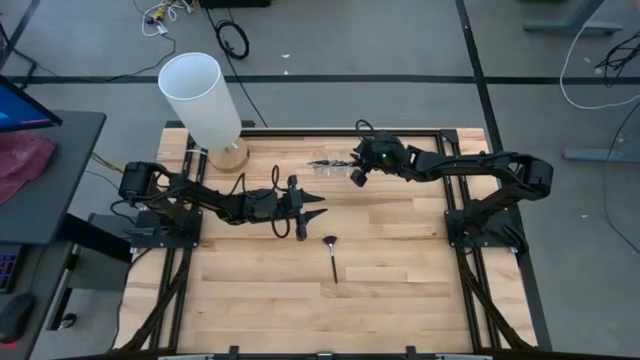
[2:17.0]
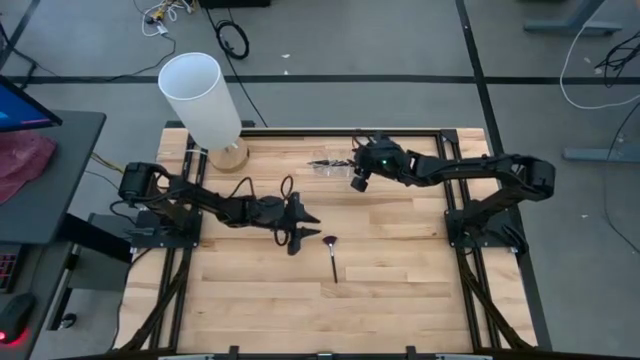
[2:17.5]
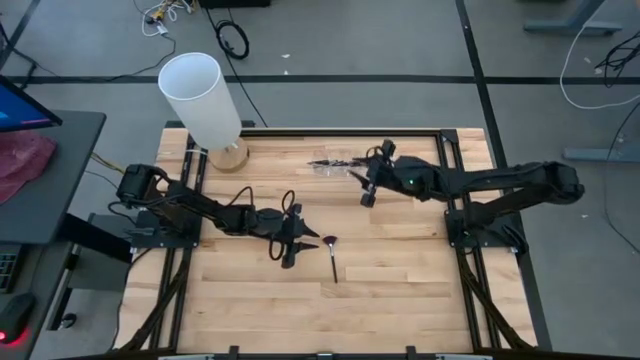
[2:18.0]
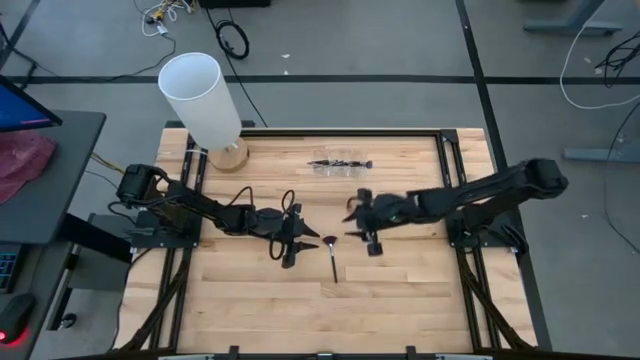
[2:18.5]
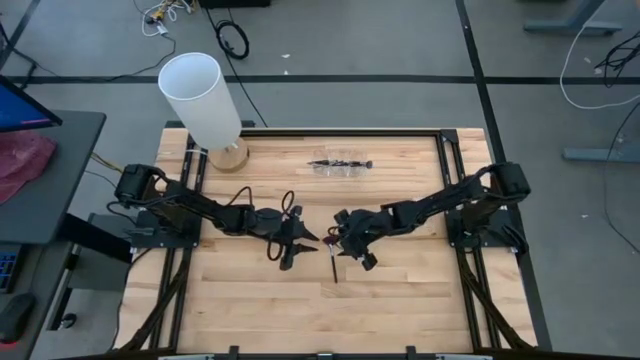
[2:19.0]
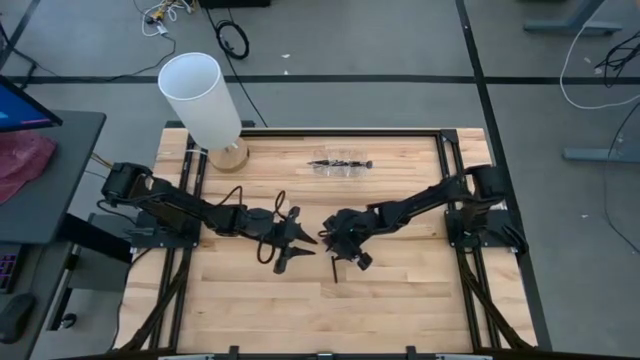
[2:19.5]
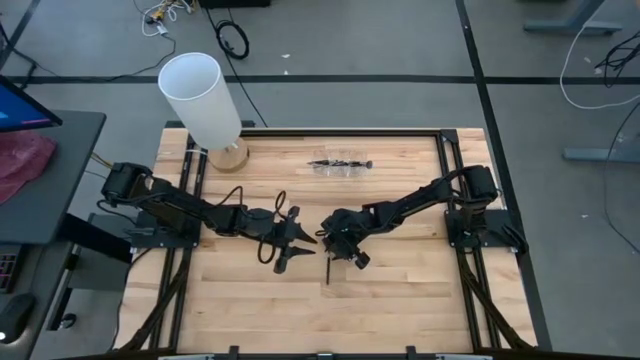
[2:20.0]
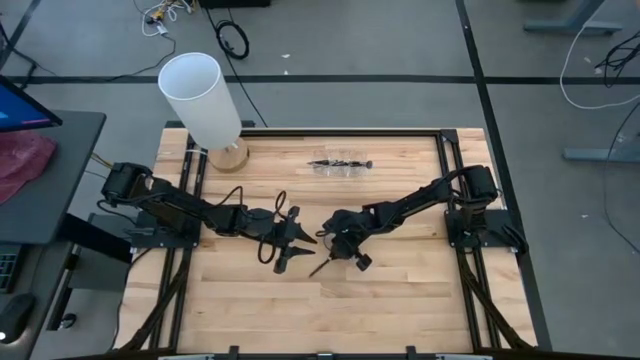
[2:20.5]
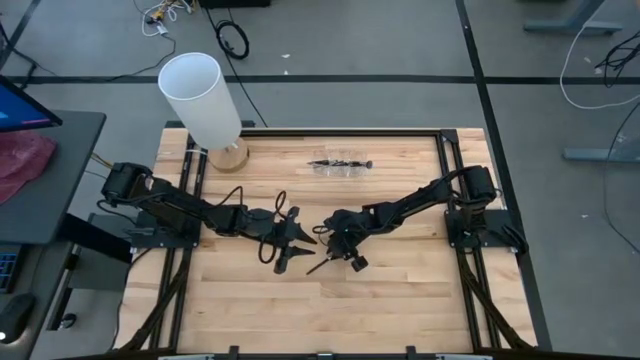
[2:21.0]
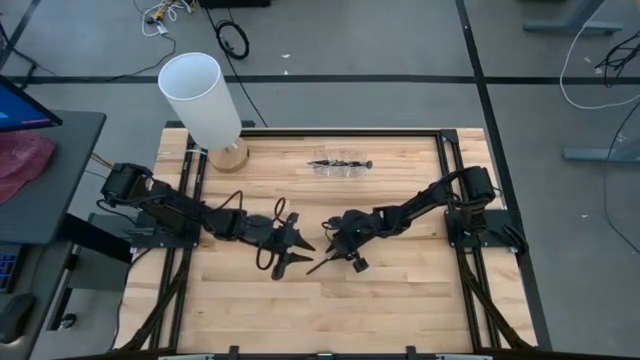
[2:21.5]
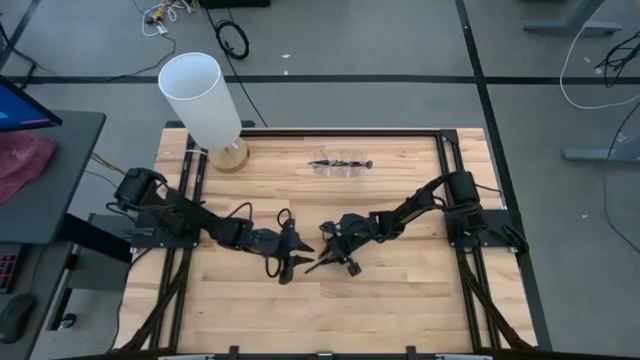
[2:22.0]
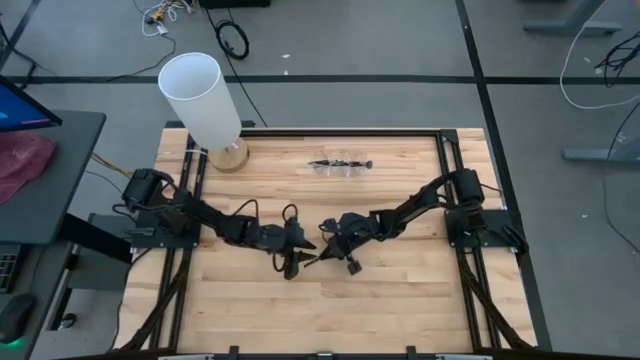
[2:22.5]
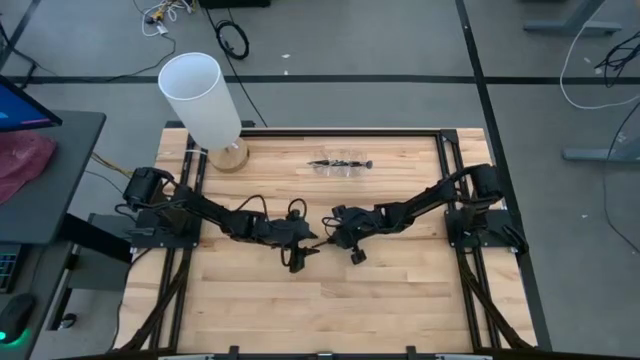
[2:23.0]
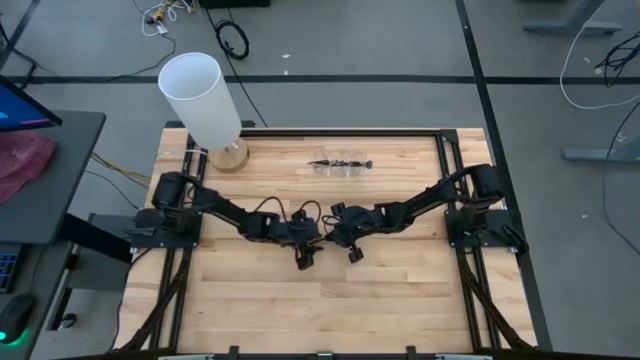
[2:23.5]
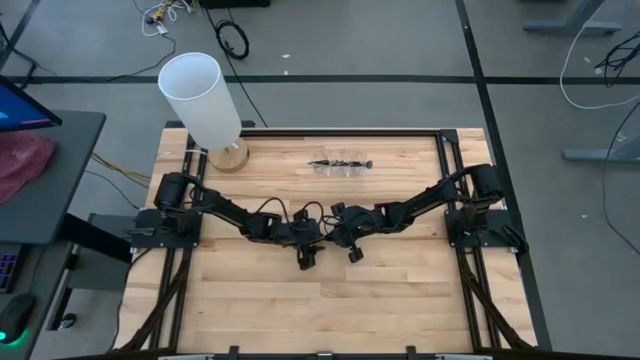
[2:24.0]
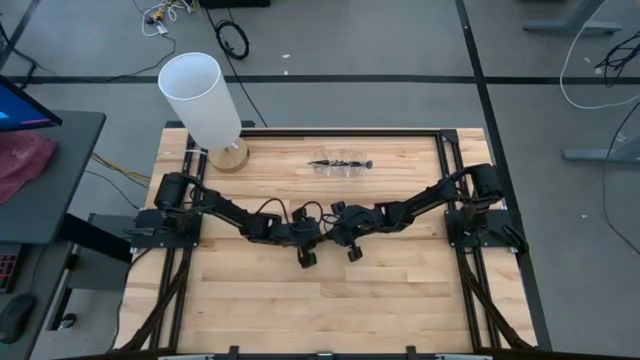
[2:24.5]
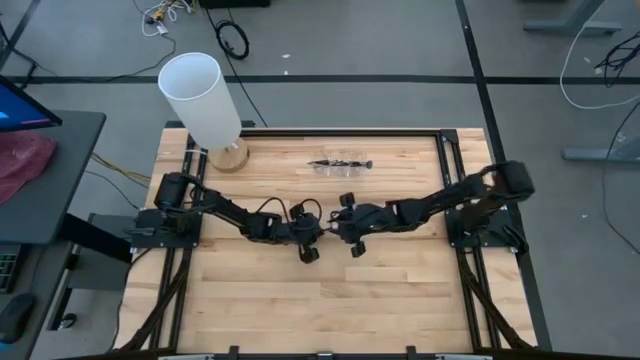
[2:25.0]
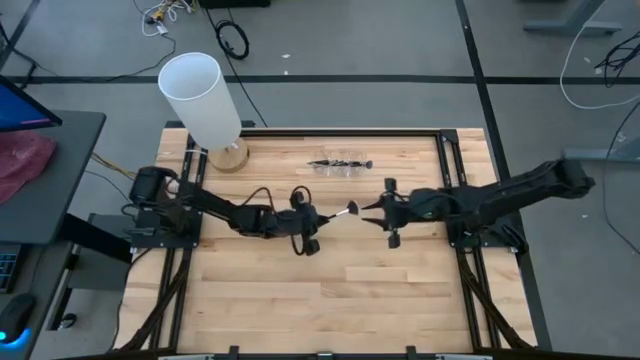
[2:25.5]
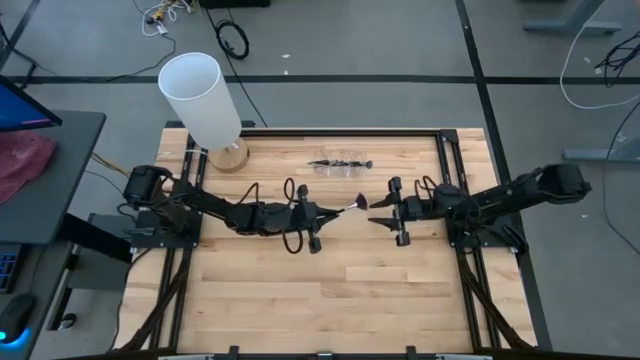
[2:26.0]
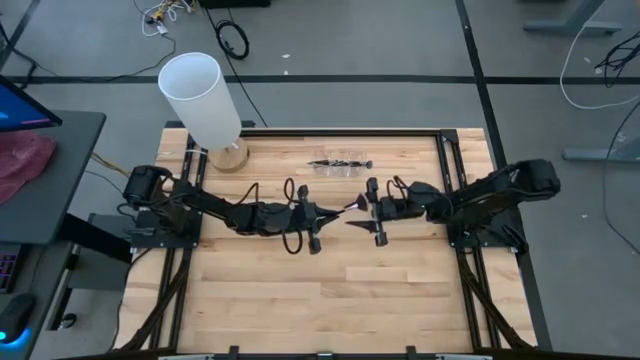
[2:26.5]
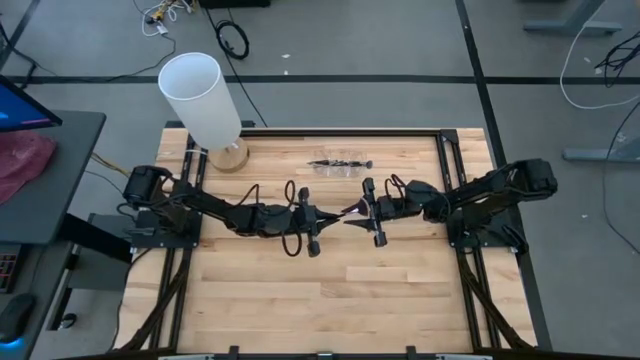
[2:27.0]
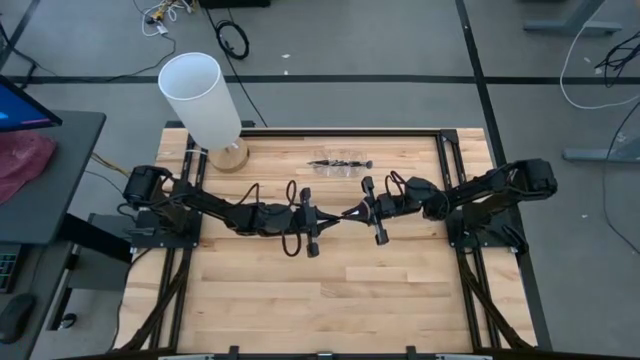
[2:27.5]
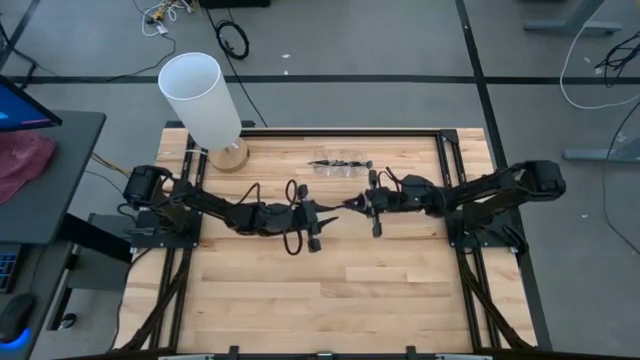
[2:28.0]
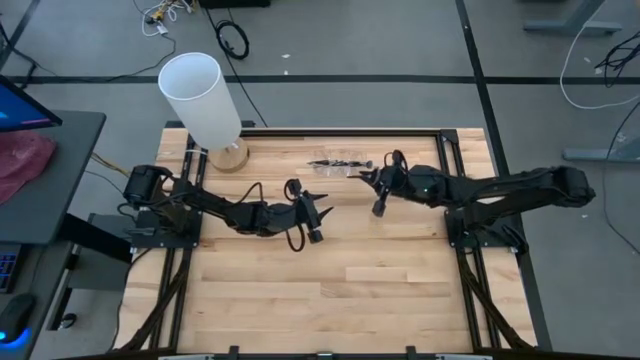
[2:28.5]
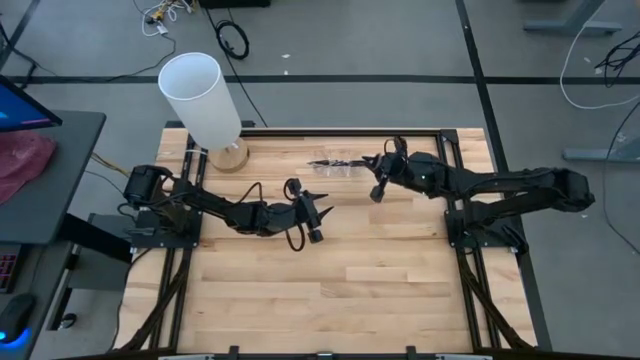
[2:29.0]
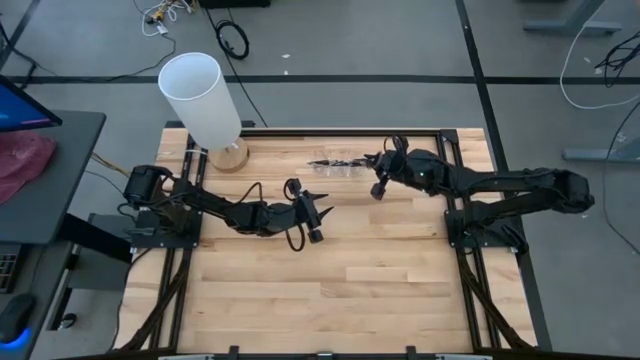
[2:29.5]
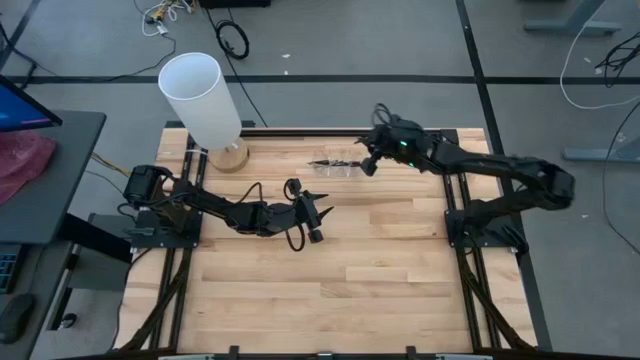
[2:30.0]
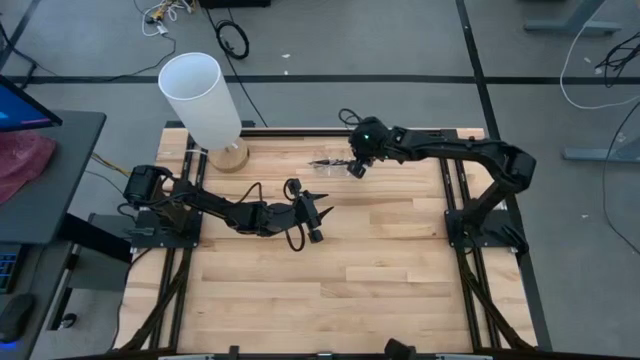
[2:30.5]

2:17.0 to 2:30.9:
Task: Pick & Place Makeup Supplies
Put the makeup brush into the transparent organizer

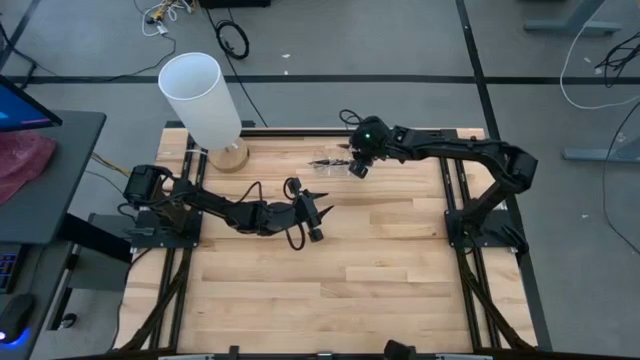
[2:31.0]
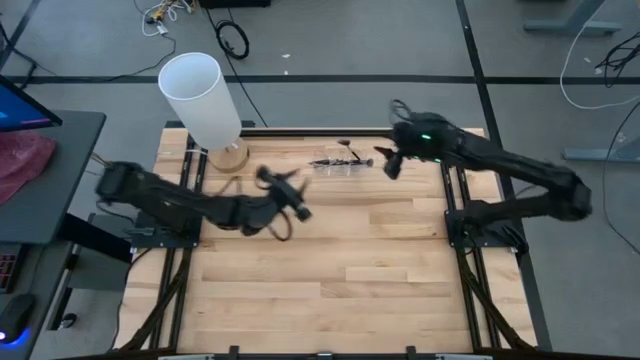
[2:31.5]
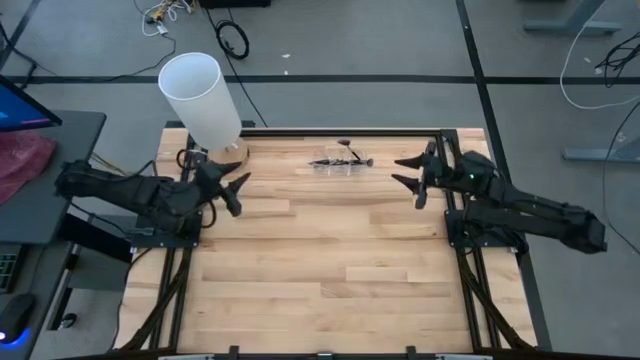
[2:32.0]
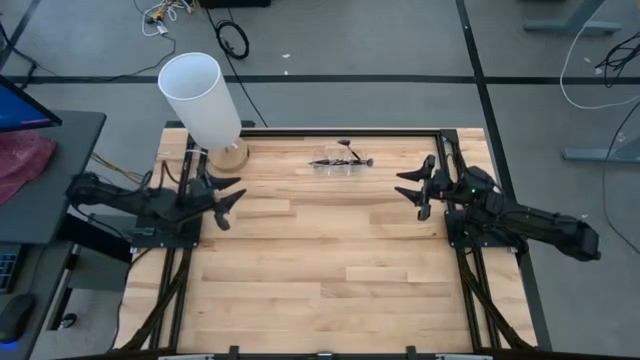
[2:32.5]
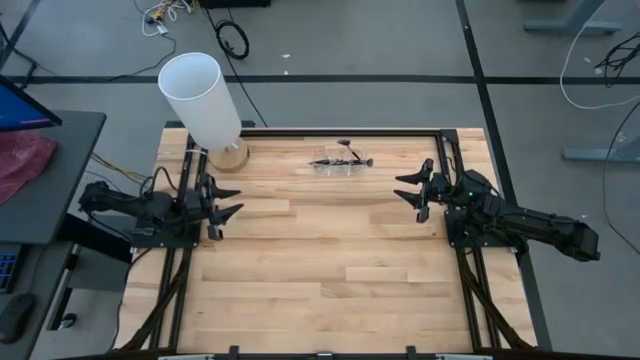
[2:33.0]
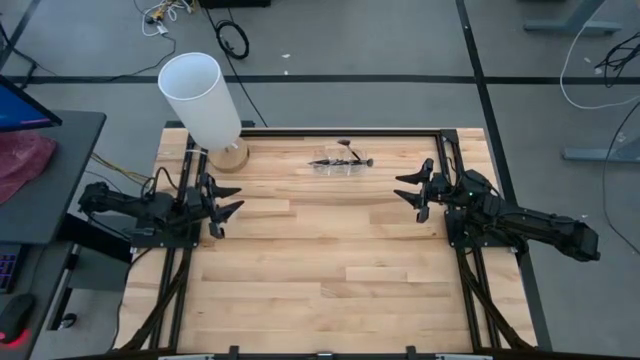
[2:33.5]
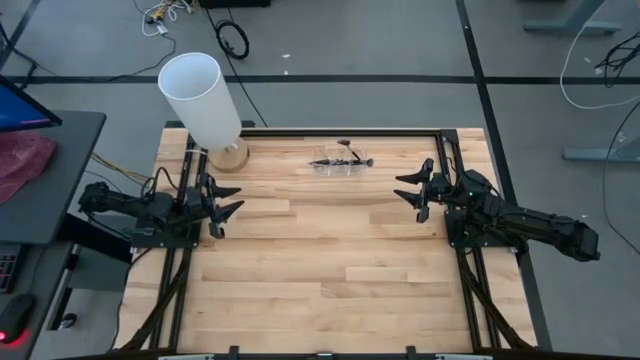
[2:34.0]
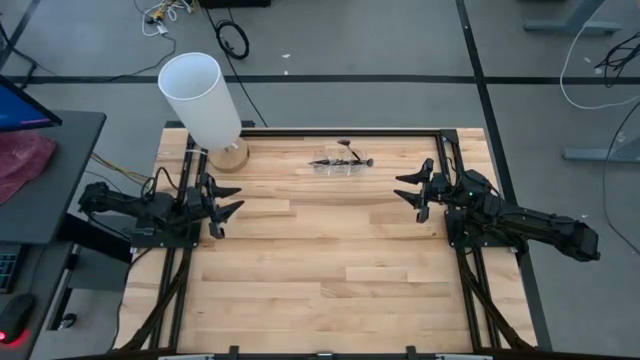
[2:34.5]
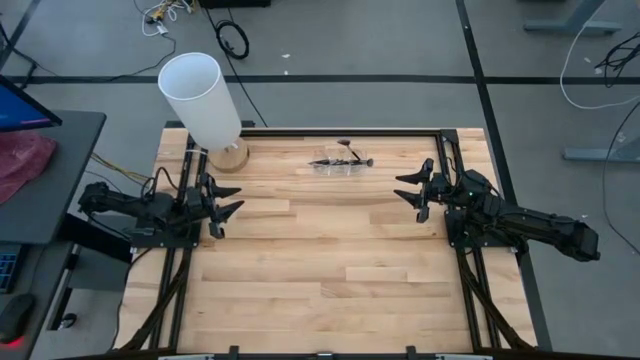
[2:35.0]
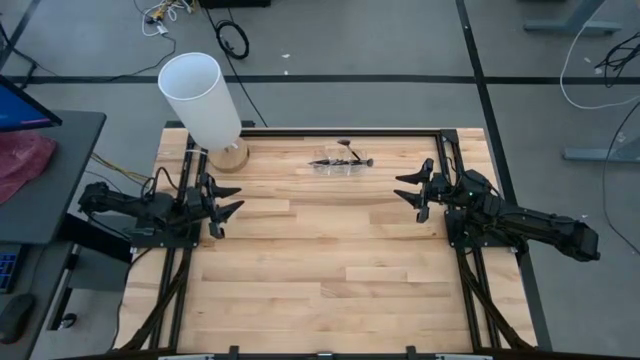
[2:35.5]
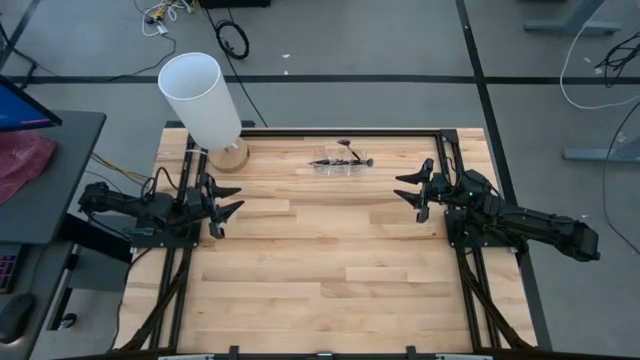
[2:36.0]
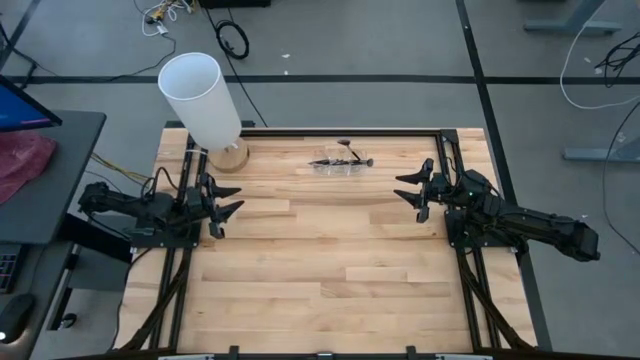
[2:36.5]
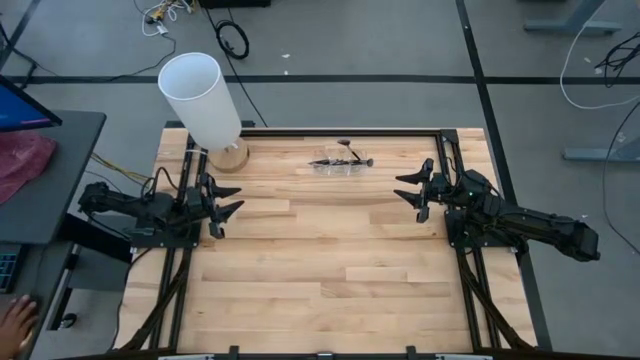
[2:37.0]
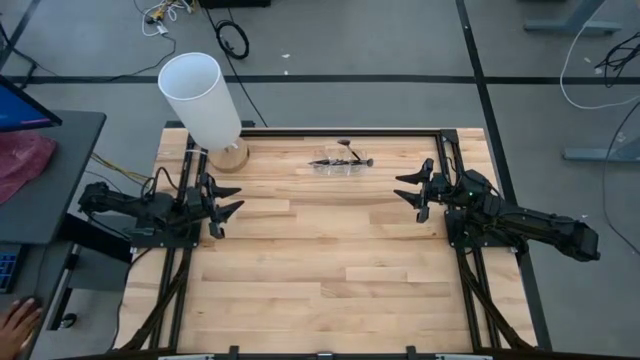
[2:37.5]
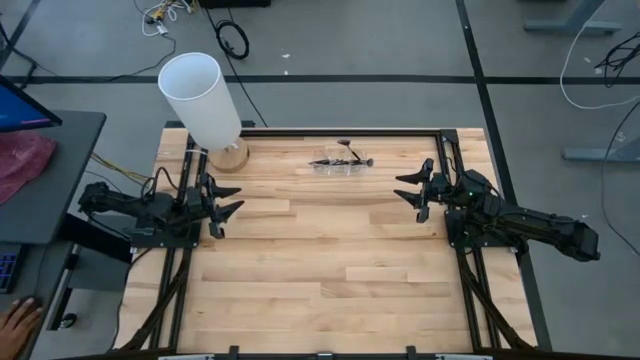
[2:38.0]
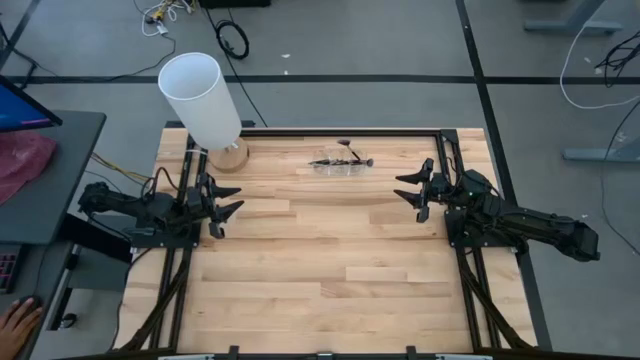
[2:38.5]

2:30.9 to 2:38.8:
Return to Home Position

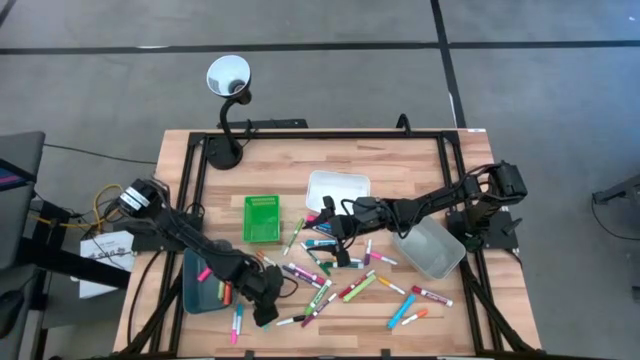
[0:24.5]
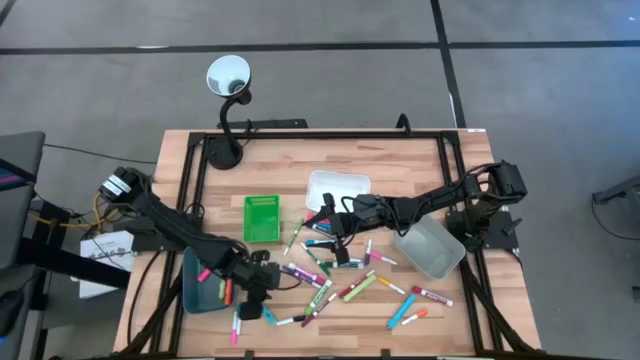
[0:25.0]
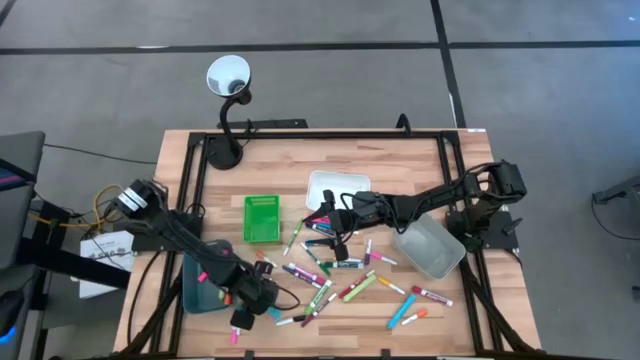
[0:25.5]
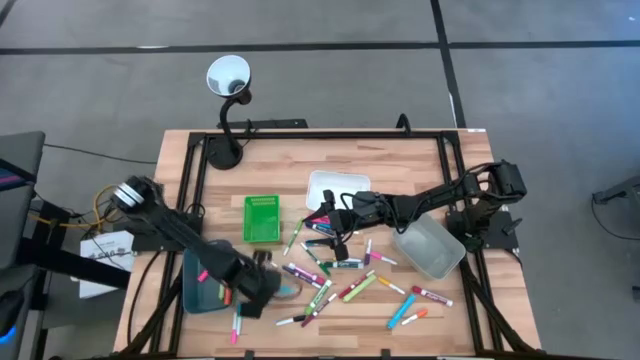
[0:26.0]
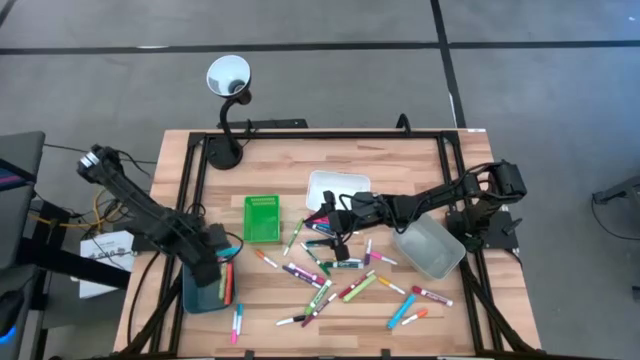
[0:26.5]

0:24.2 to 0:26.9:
Task: Pick & Place Markers
Put the big blue highlighter pen into the blue bin
